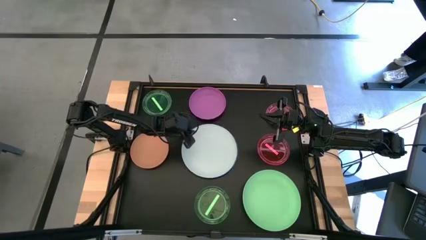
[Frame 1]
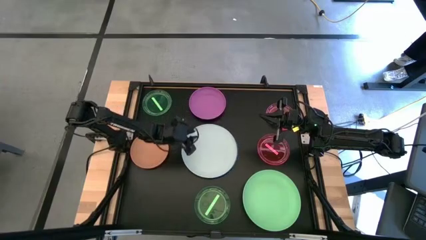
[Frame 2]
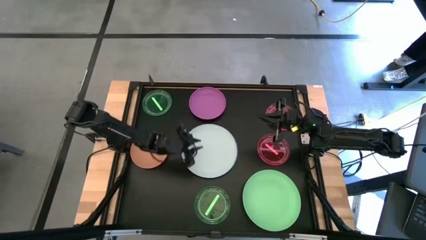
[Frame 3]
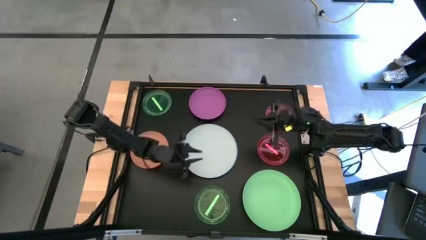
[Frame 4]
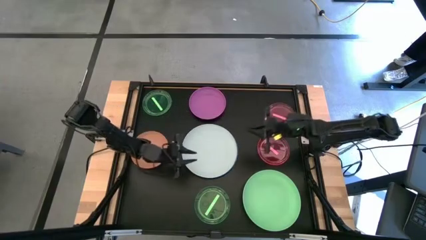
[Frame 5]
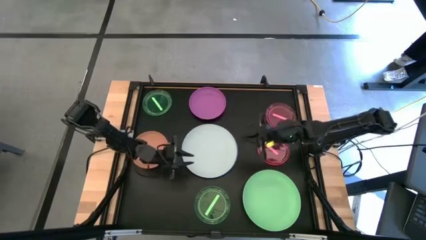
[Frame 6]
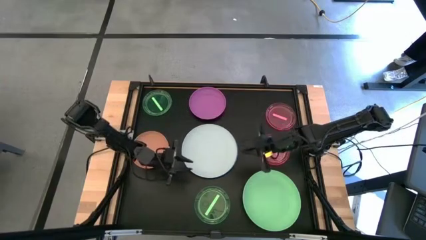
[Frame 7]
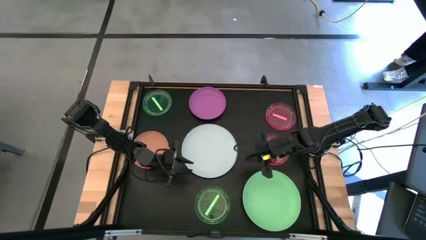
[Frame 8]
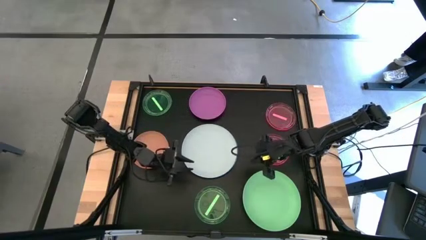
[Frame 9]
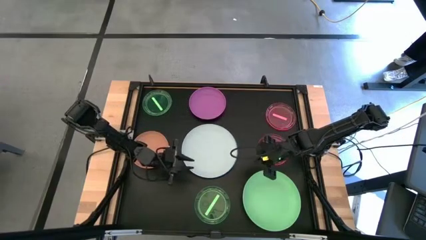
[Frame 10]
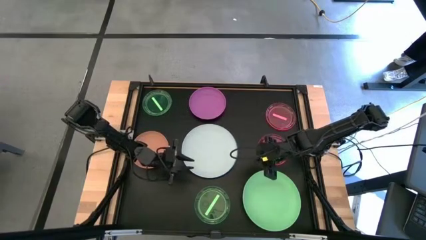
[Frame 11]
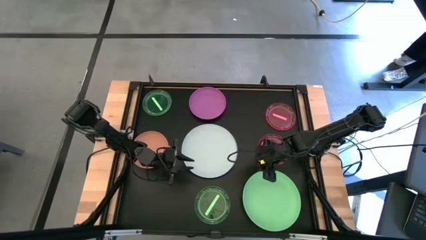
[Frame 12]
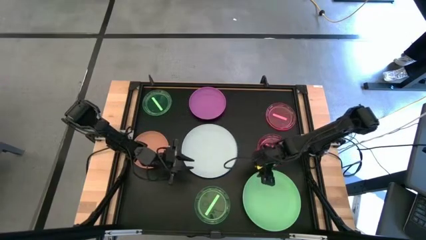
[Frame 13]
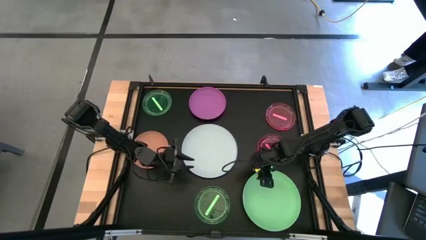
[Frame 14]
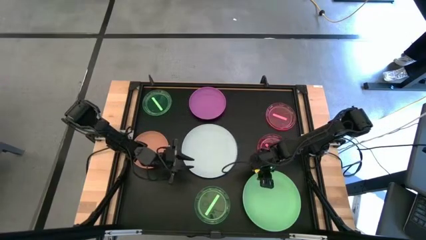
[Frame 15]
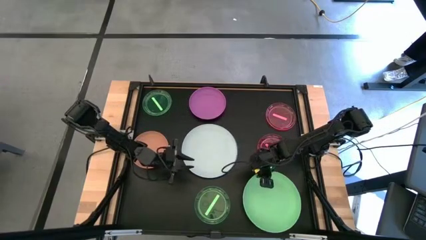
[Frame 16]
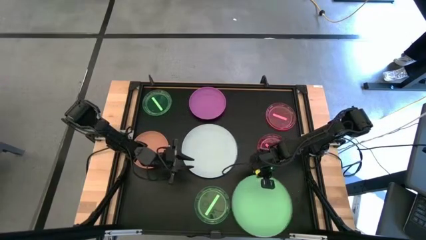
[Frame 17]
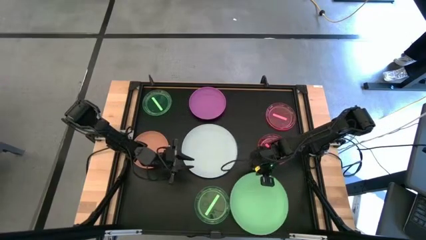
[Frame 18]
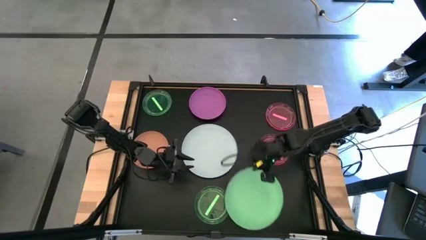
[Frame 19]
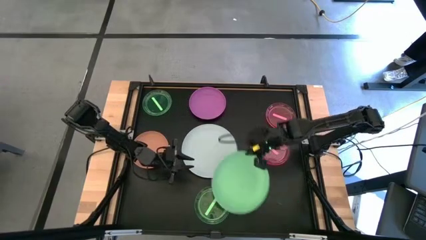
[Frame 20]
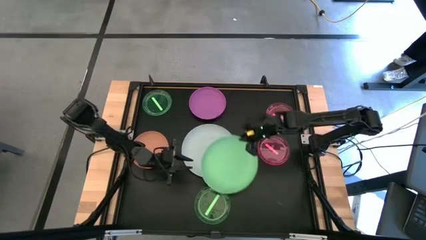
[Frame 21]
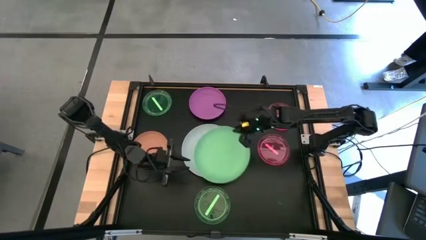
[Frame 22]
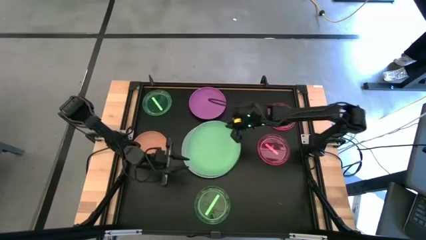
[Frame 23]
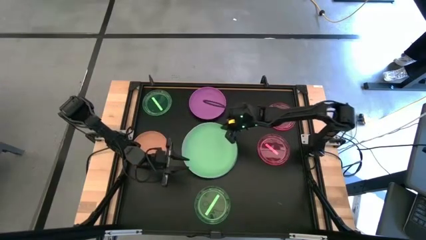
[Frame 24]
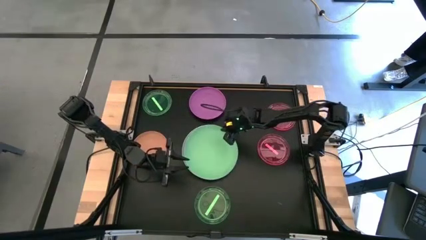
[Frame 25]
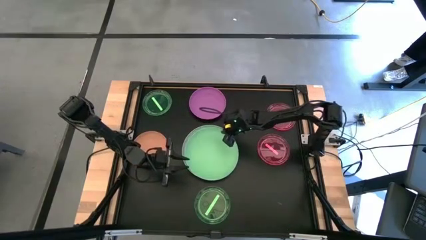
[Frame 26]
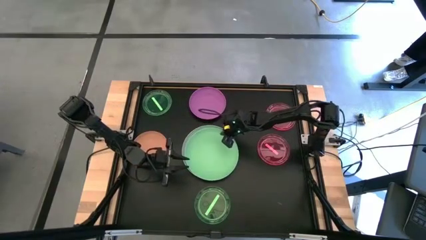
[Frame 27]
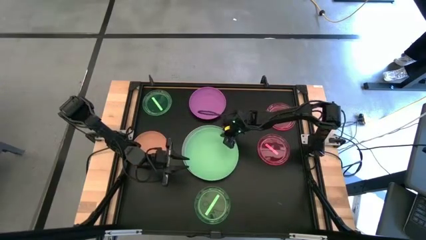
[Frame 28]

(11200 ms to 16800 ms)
Task: Stack plastic plates
Stack the green plate on top of the white plate

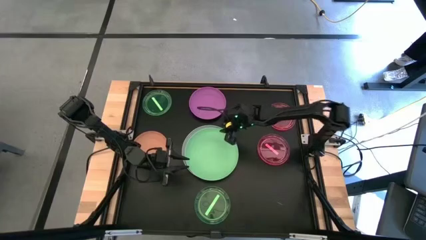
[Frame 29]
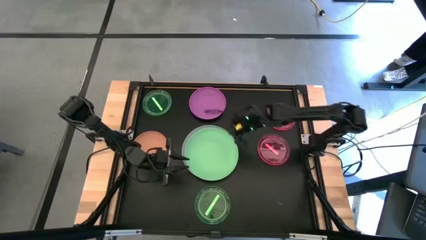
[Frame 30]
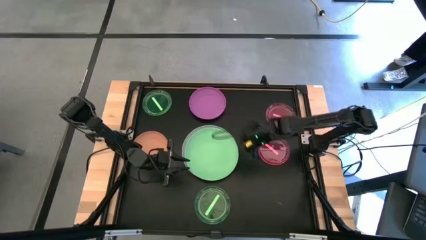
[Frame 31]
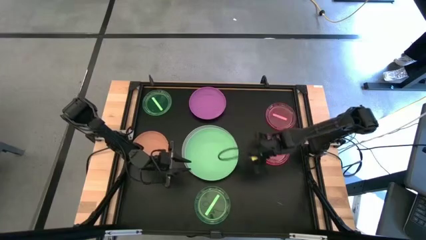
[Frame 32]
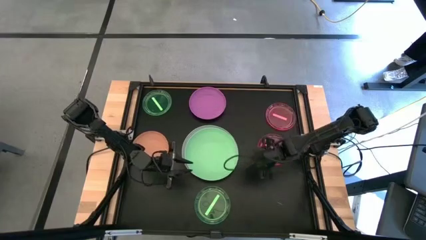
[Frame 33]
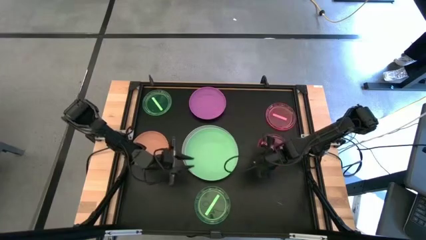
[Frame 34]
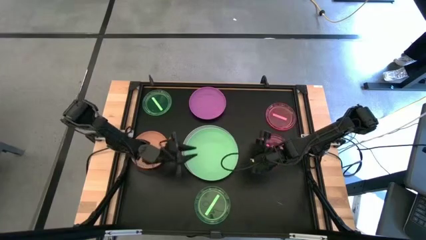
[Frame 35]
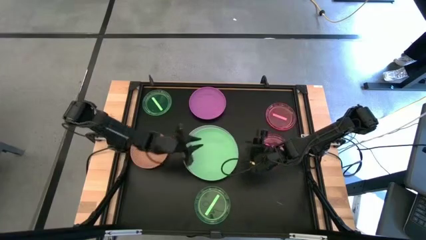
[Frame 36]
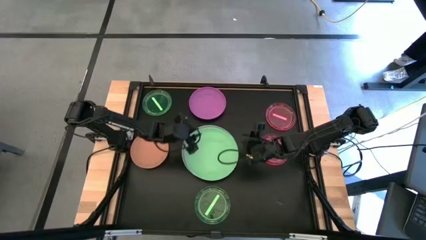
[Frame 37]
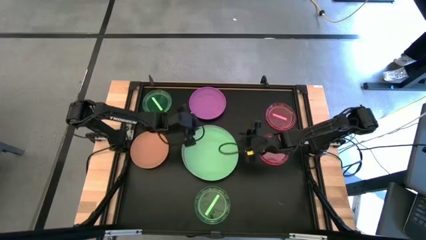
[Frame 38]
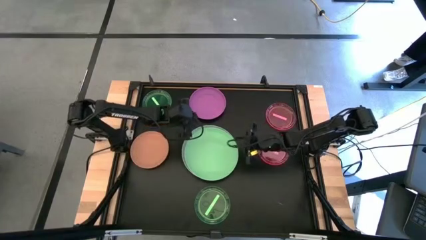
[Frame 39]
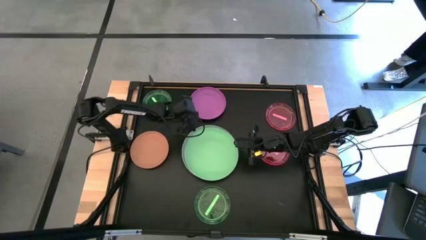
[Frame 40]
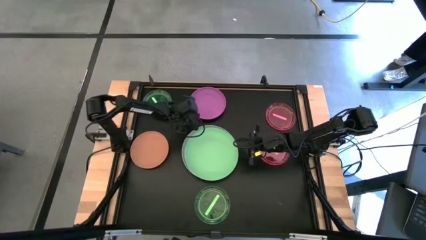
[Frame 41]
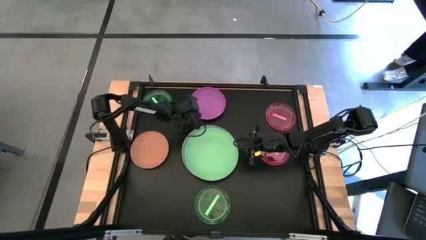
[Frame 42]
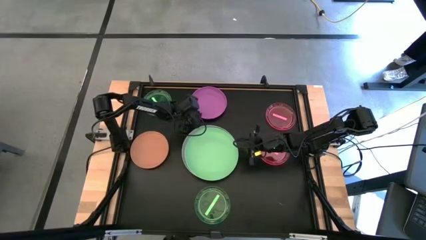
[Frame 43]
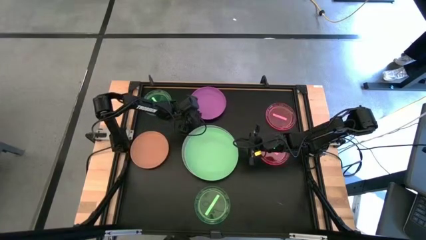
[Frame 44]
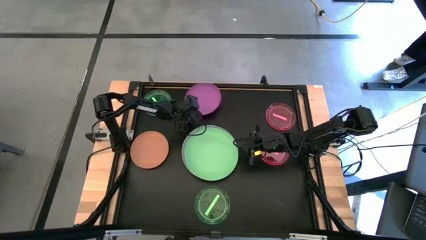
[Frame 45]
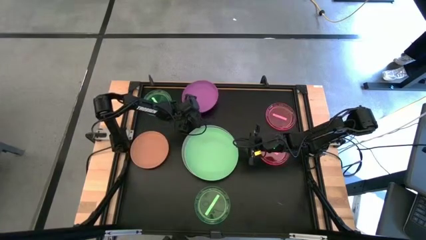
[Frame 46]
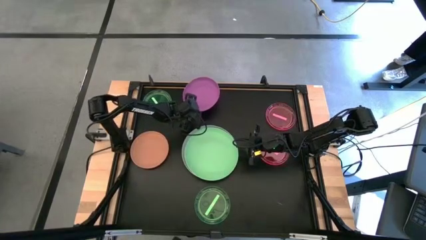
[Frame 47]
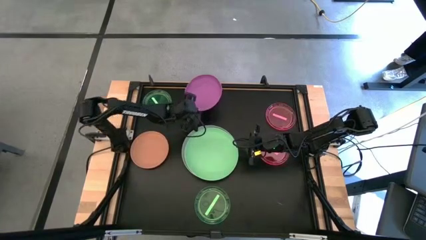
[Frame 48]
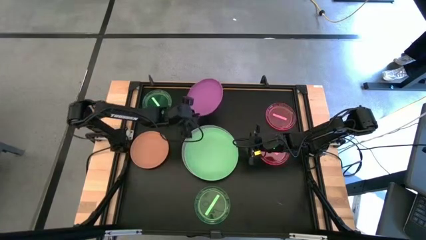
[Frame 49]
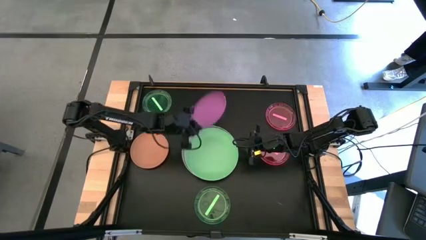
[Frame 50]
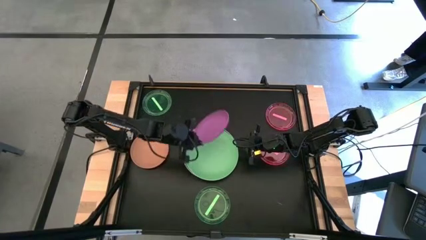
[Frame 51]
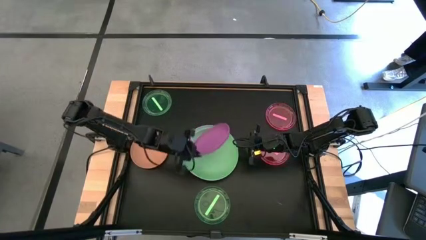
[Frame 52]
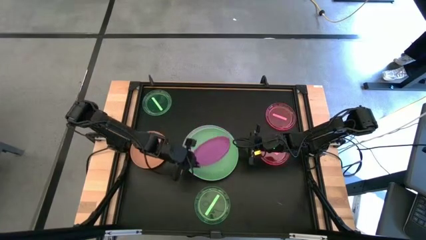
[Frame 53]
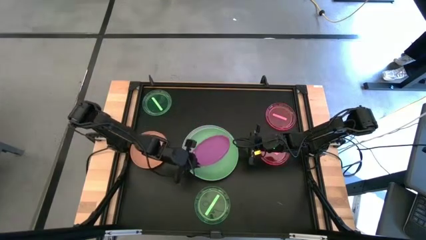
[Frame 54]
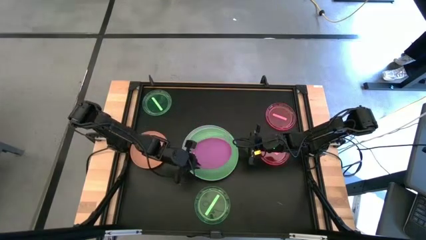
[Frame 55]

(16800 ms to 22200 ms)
Stack the pink plate on top of the green plate

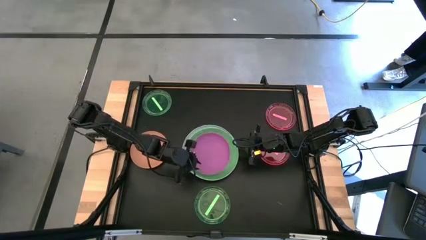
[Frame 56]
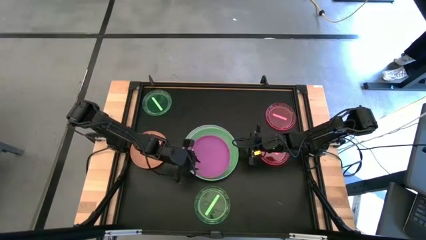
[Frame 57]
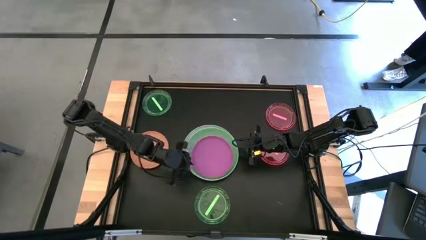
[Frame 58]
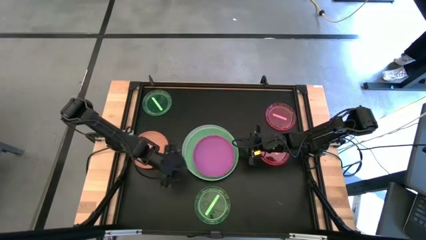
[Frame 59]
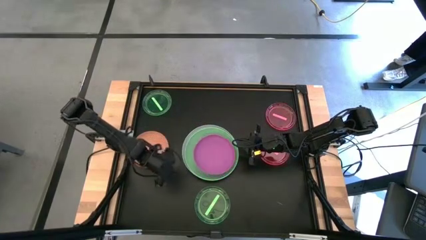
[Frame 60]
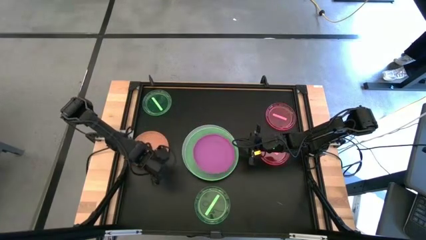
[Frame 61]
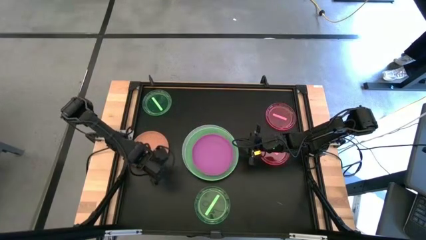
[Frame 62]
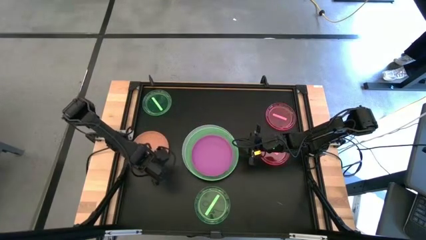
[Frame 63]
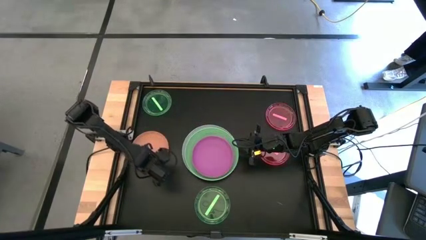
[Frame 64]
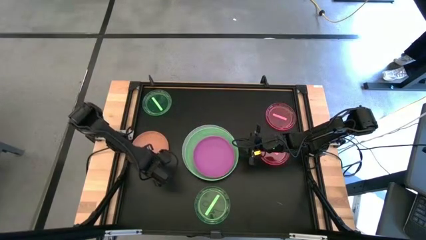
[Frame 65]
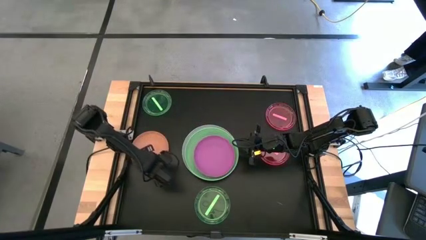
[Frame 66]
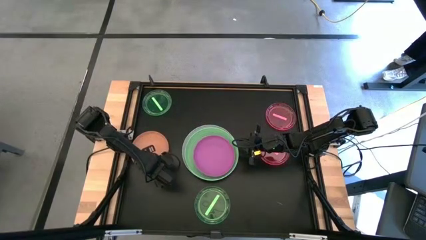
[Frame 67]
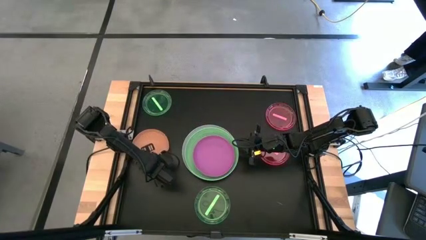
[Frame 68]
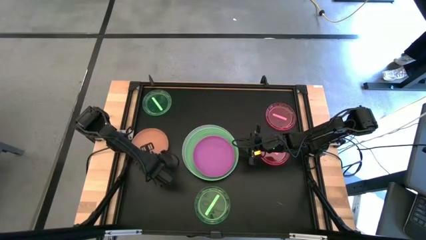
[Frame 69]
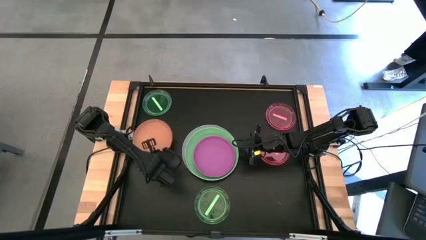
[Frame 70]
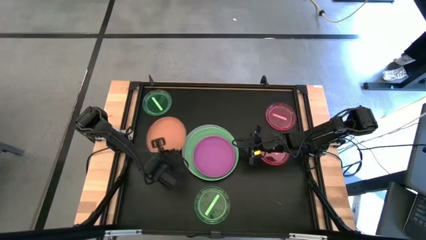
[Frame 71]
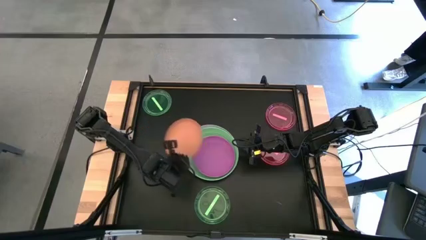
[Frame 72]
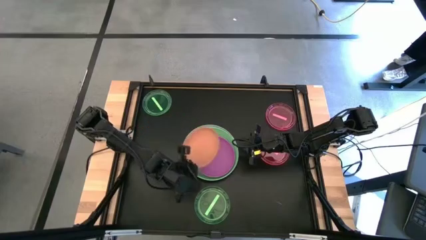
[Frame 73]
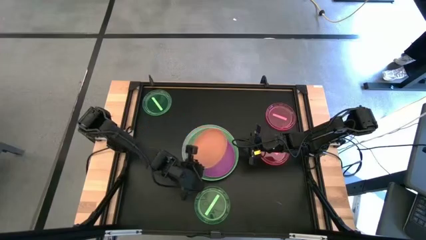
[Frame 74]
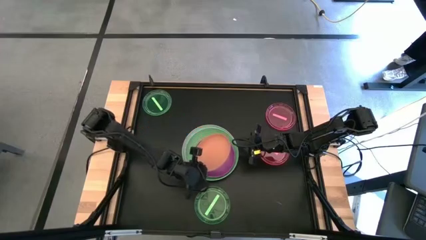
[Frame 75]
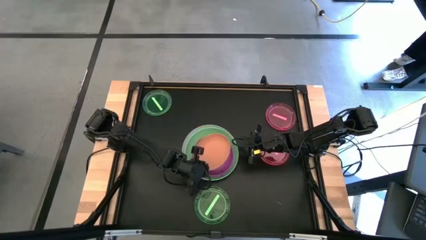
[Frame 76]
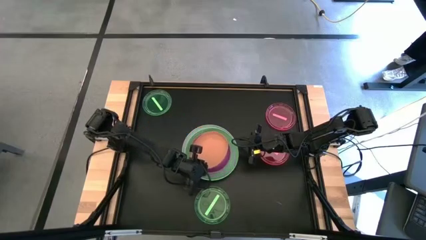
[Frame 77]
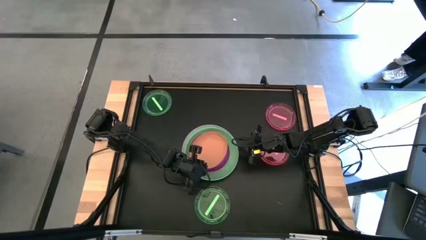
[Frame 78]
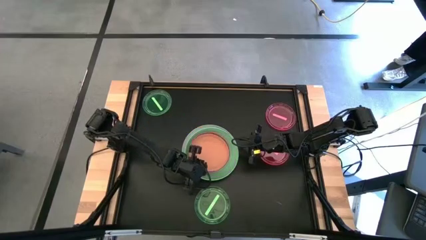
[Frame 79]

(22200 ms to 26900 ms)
Stack the orange plate on top of the pink plate

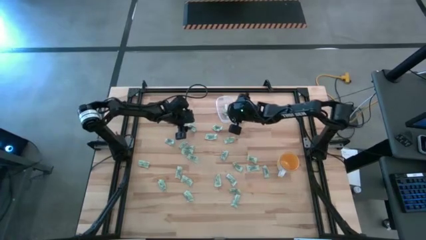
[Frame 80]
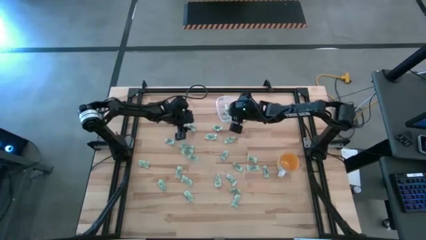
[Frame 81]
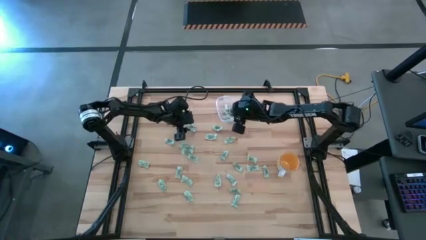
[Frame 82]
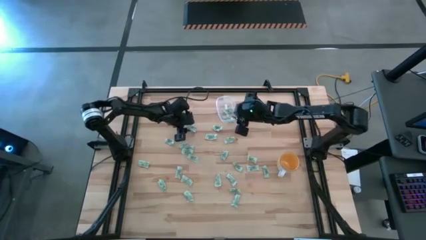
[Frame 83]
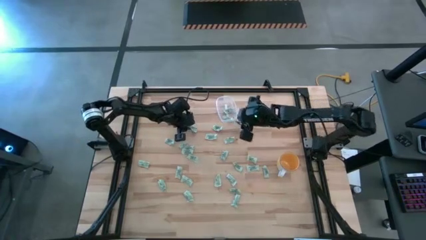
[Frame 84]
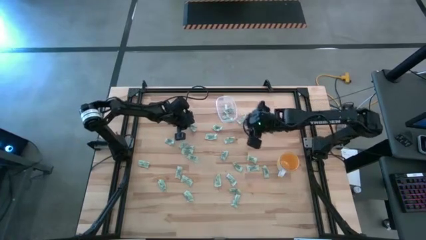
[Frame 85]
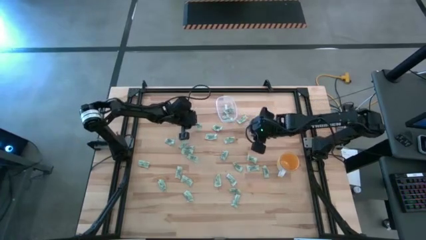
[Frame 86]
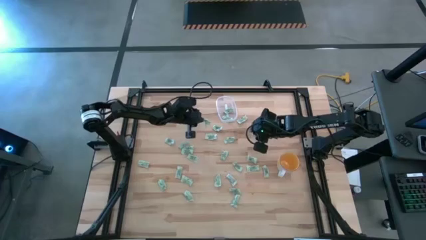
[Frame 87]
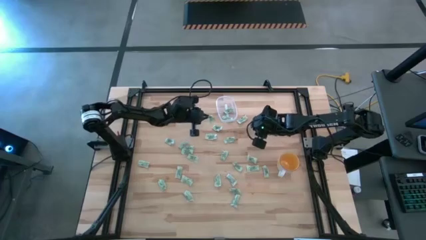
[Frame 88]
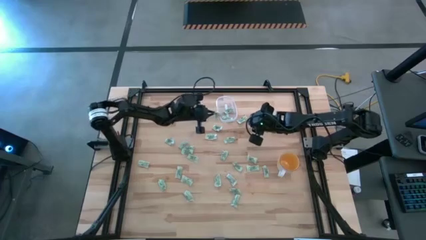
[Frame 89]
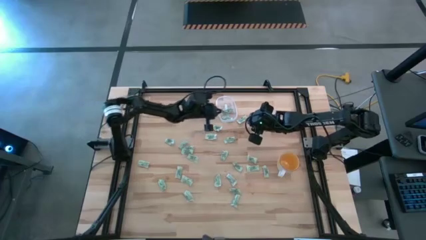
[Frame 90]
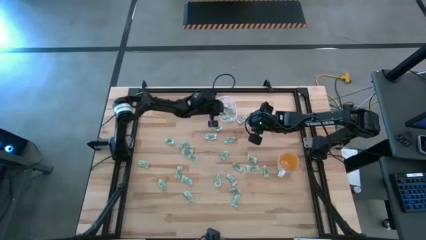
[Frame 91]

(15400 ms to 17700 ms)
Task: Pick and place Stevia / Truvia into bins
Put the green stevia packet into the transparent bin
